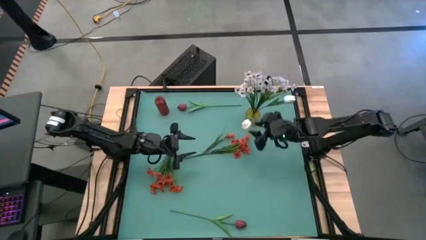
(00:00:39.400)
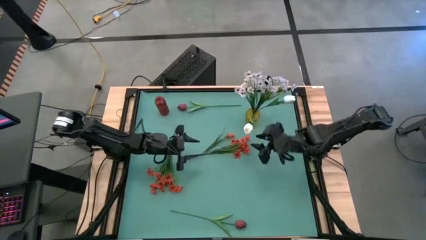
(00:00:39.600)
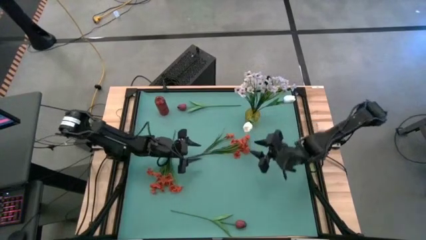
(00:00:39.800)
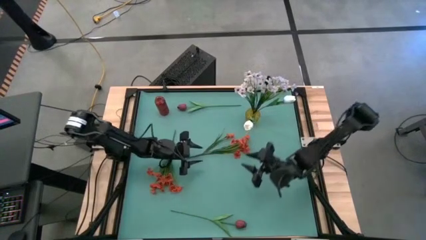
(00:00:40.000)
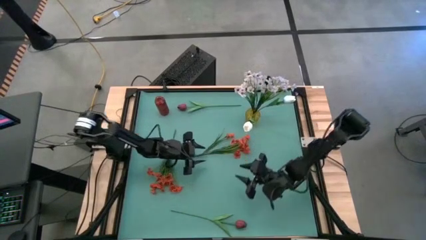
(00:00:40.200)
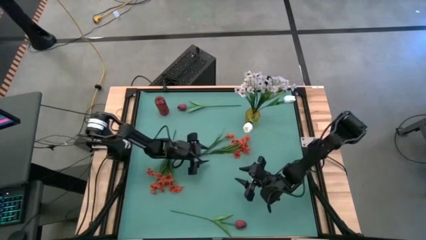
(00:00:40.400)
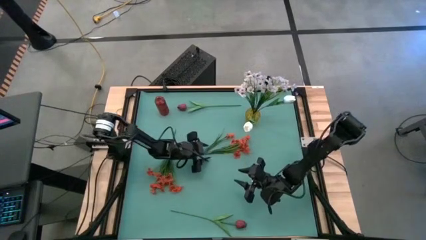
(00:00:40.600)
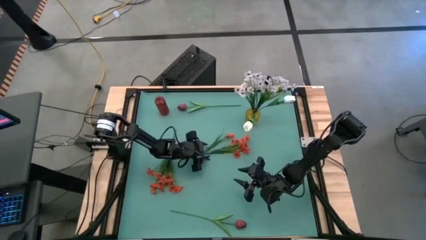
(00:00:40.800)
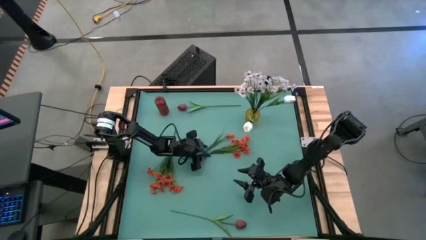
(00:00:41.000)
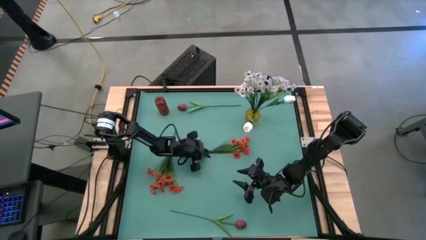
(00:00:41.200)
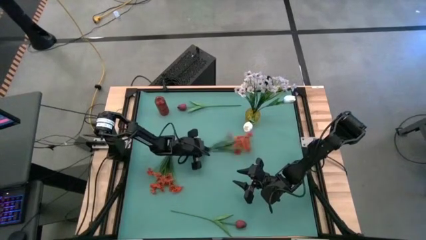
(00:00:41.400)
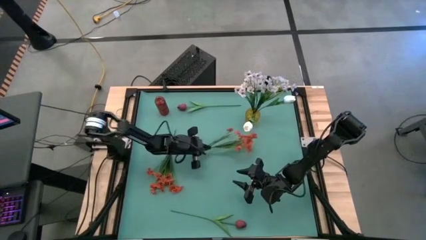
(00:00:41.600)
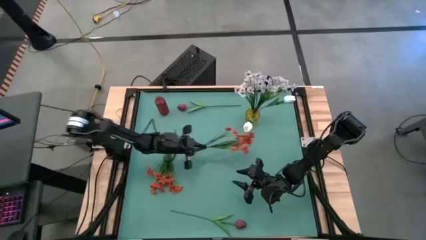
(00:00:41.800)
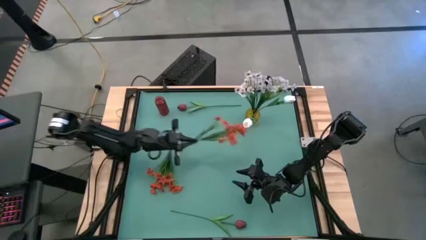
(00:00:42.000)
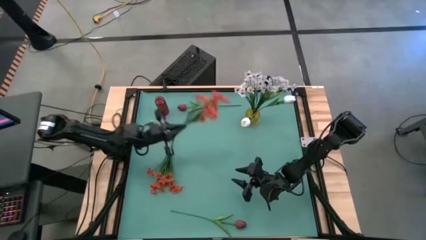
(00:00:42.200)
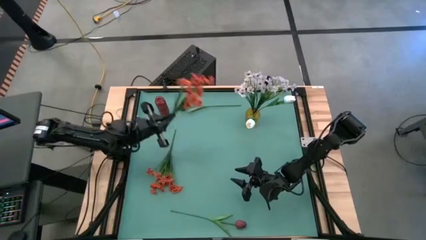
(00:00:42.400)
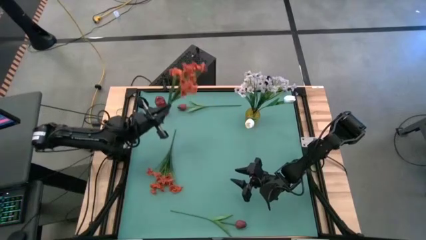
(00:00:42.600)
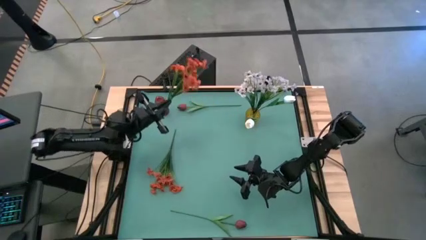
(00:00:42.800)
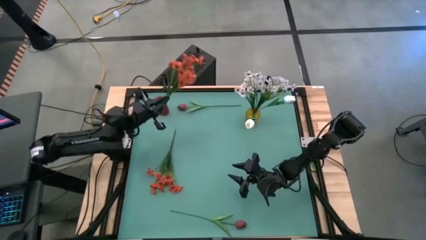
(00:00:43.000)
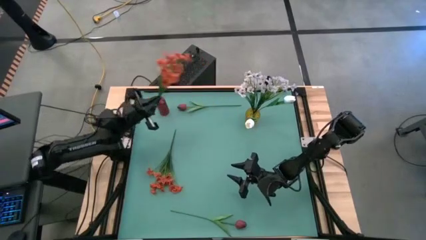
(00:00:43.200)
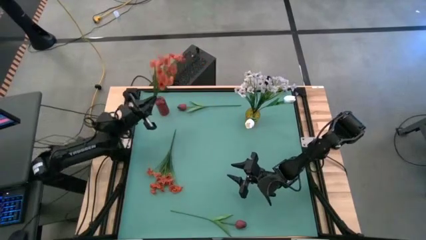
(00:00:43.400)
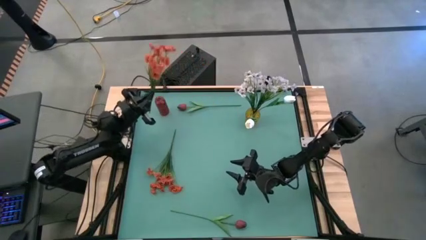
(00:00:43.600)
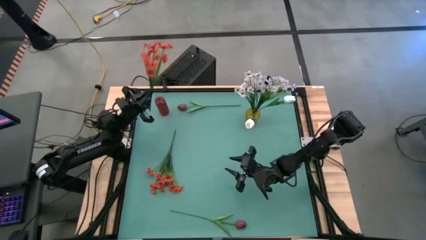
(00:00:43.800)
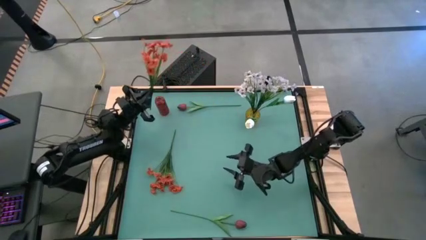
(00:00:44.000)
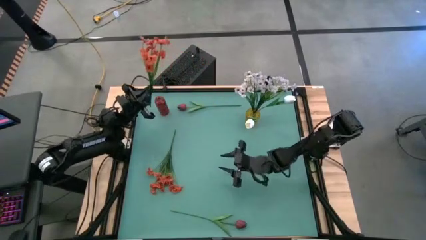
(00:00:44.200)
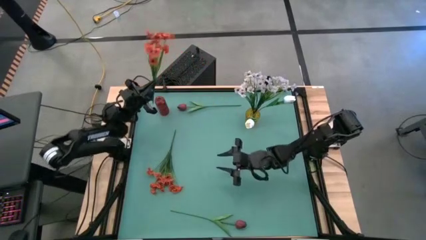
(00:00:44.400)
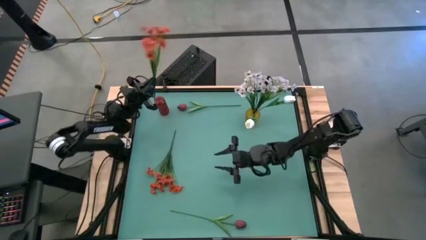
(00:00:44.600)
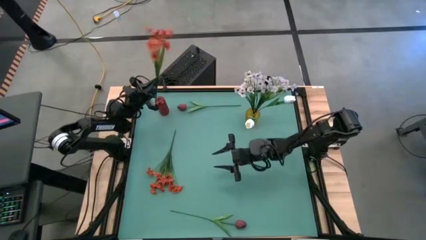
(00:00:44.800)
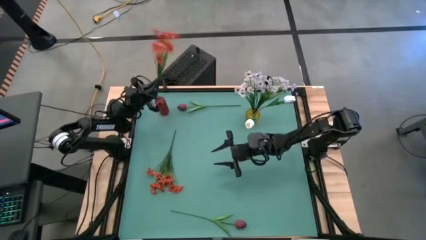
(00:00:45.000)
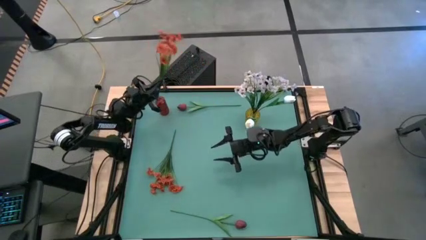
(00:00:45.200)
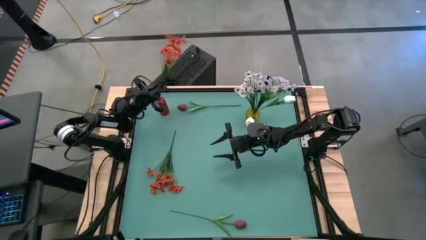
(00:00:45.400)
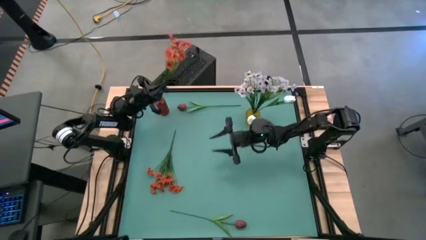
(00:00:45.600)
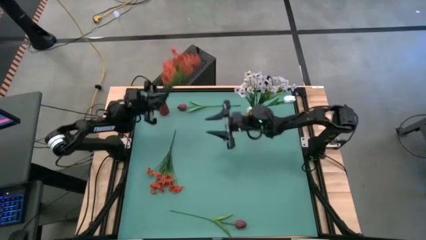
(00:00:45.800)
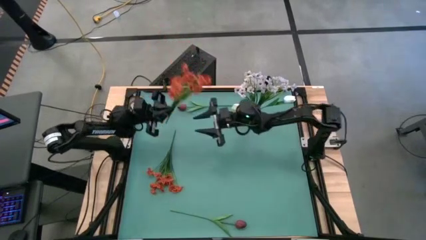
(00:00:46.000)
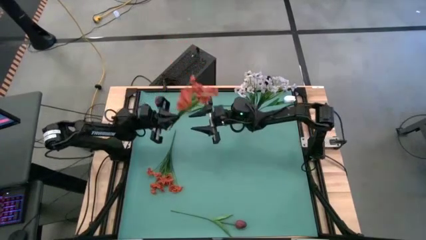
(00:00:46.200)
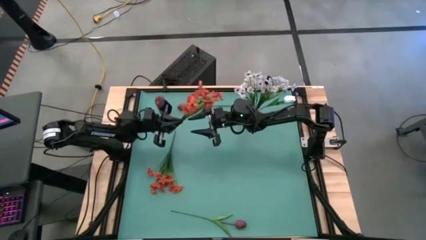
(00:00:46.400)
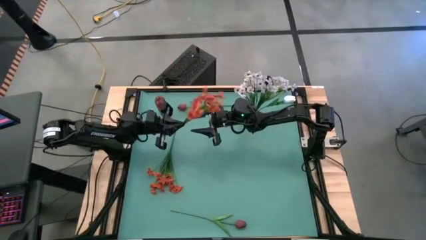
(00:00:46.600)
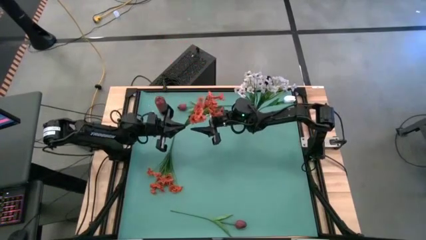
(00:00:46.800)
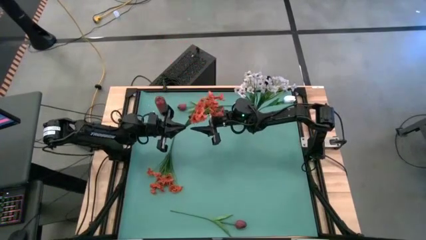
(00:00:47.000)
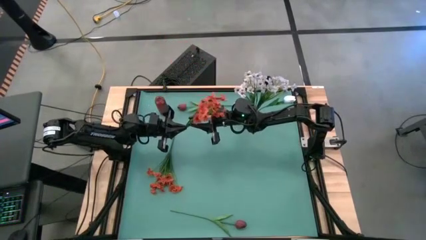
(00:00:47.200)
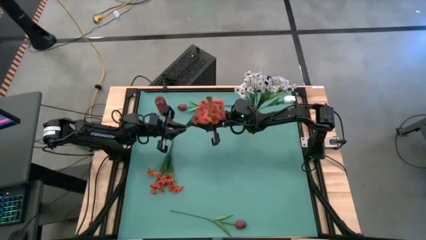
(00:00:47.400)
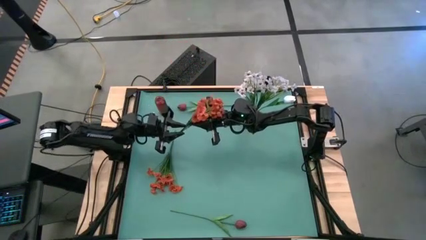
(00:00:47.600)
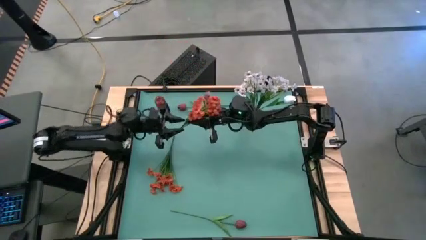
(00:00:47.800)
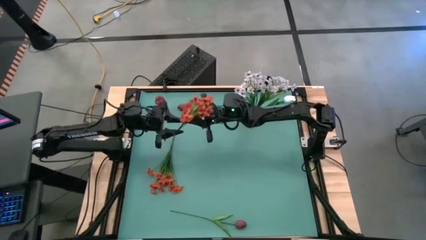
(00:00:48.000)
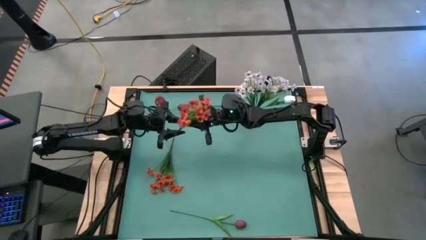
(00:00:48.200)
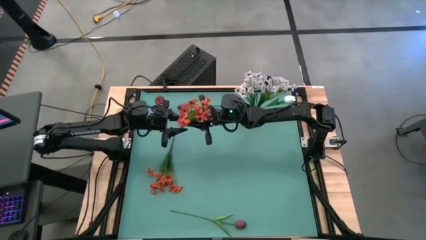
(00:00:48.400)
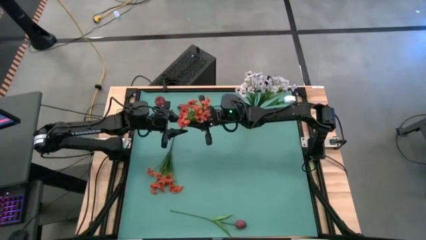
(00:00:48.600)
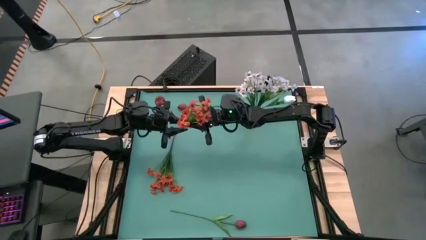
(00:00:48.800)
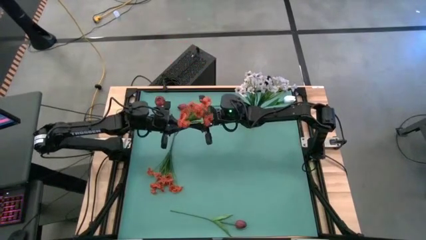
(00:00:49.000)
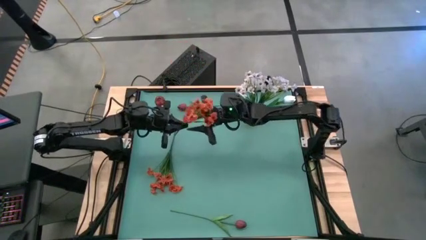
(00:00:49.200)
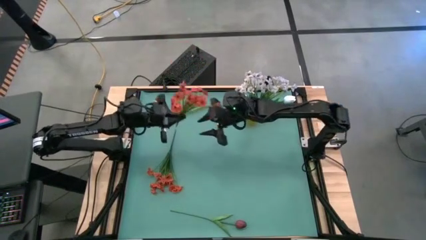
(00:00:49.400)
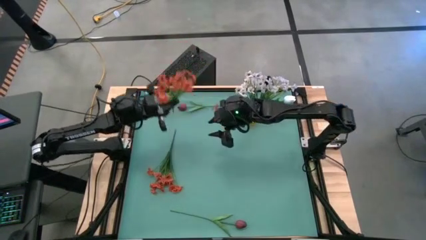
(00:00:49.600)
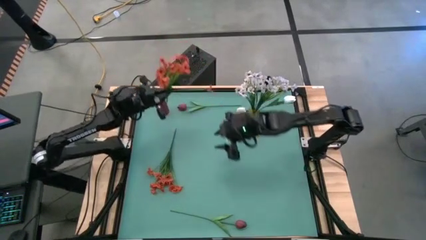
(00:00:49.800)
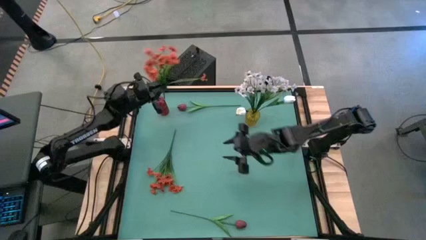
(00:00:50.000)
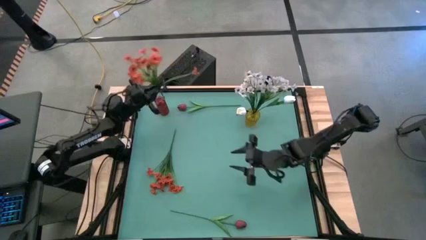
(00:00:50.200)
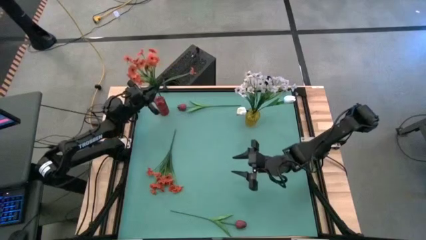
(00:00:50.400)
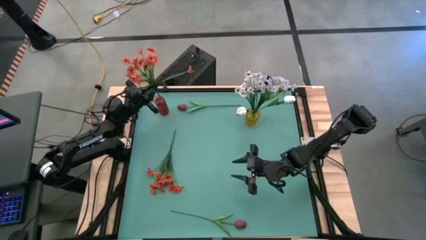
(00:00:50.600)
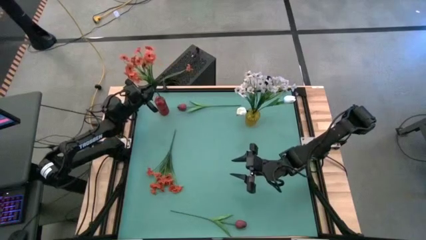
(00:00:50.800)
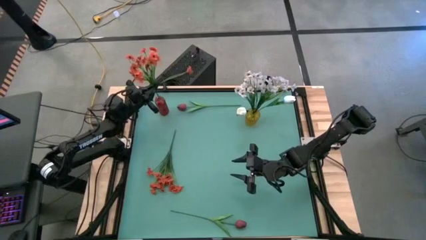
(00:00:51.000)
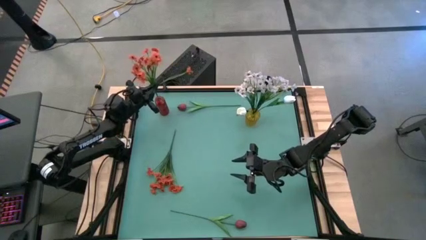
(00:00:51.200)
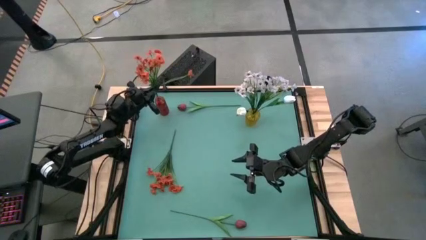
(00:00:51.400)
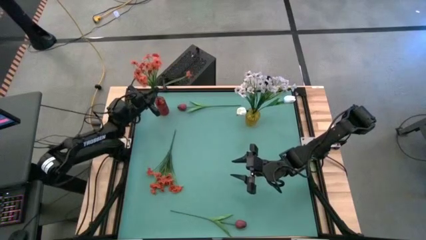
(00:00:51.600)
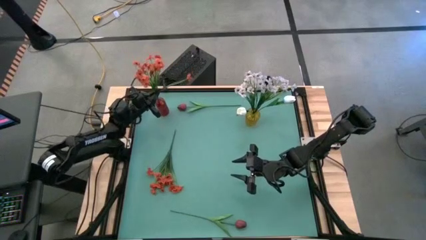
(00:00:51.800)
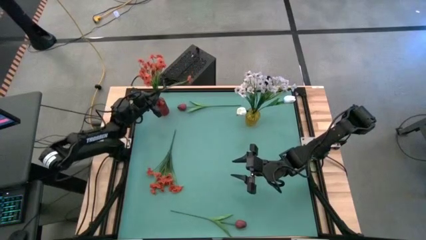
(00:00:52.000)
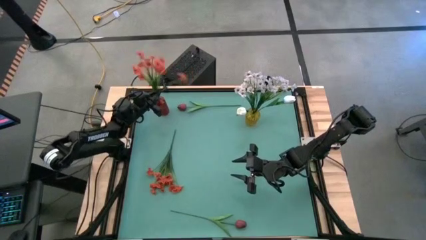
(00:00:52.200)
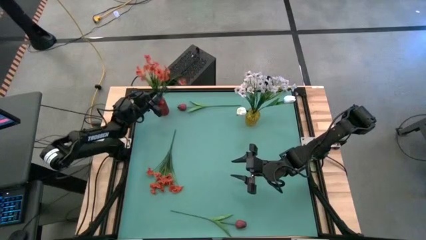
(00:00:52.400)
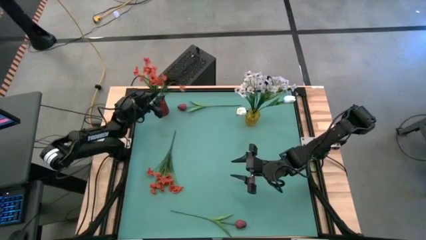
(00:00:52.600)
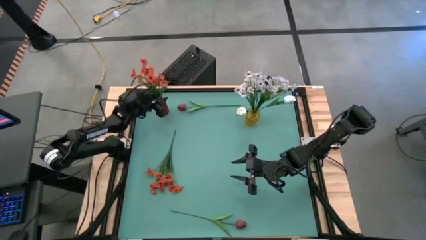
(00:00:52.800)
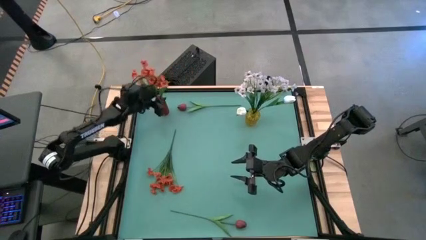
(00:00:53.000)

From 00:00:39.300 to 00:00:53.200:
Task: Sort flowers into vase by color
Put the right orange flowers into the red flower vase

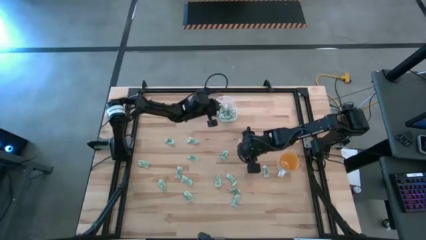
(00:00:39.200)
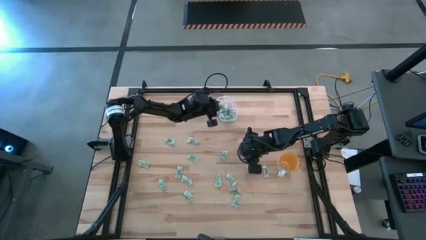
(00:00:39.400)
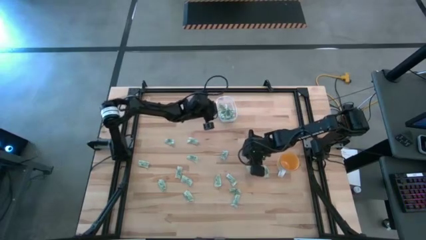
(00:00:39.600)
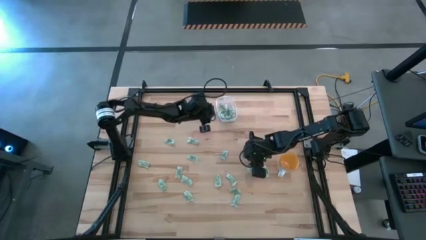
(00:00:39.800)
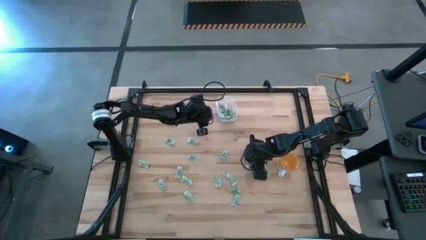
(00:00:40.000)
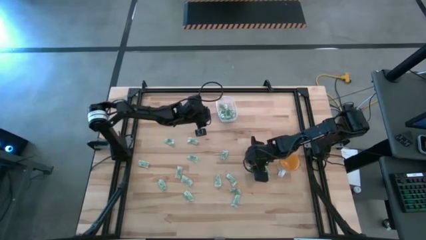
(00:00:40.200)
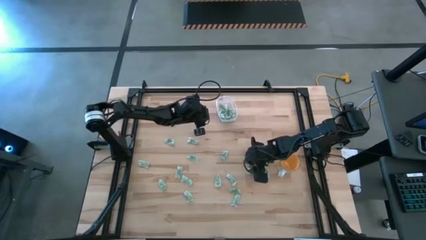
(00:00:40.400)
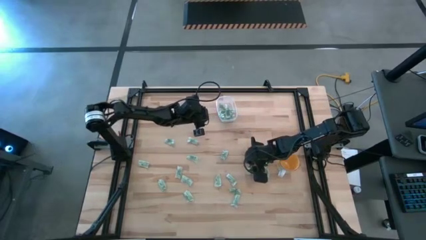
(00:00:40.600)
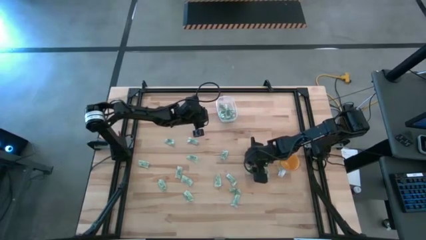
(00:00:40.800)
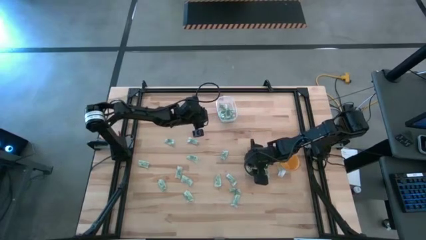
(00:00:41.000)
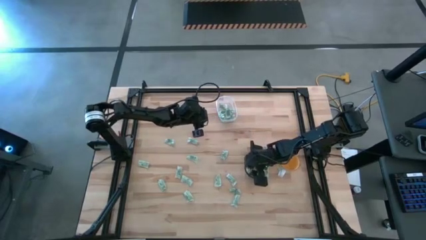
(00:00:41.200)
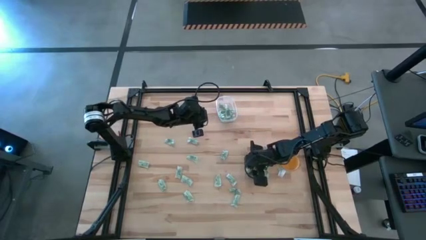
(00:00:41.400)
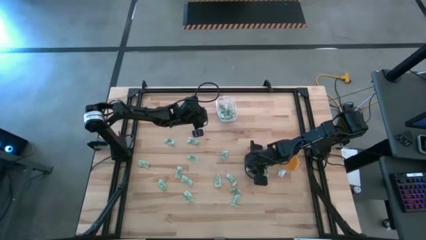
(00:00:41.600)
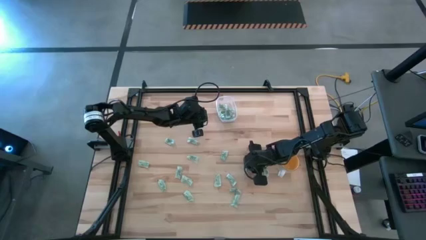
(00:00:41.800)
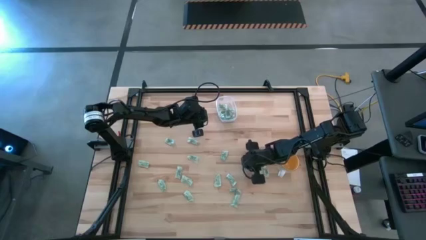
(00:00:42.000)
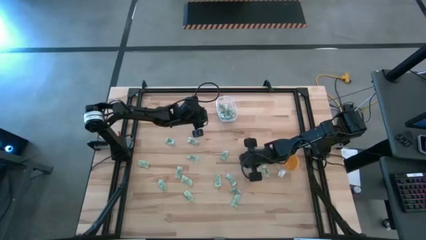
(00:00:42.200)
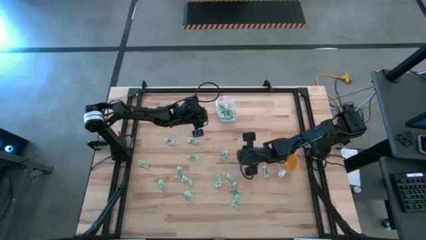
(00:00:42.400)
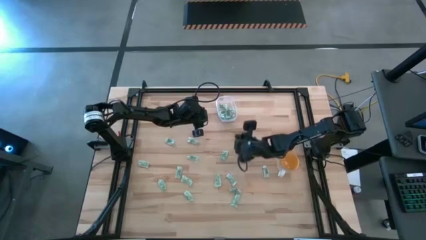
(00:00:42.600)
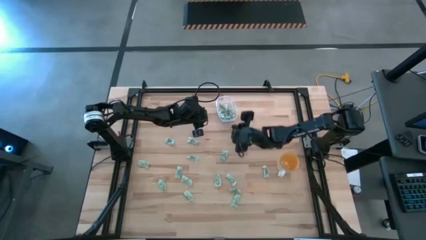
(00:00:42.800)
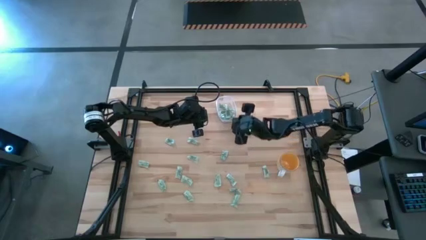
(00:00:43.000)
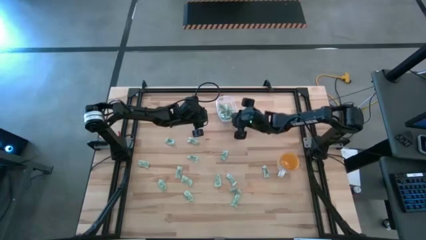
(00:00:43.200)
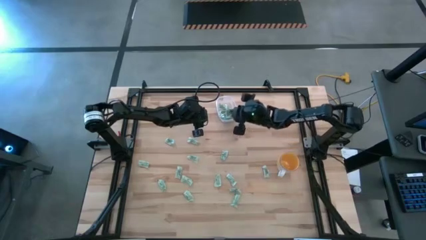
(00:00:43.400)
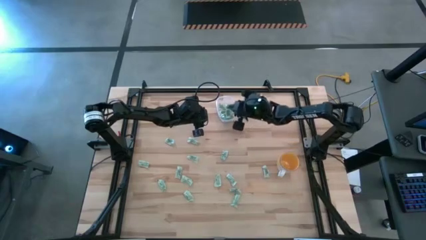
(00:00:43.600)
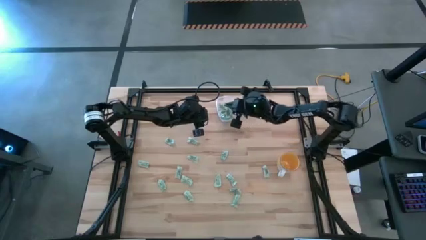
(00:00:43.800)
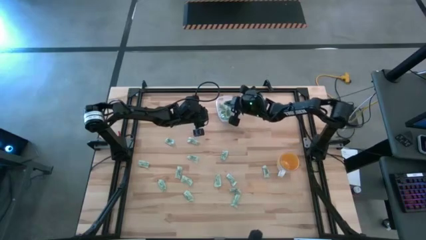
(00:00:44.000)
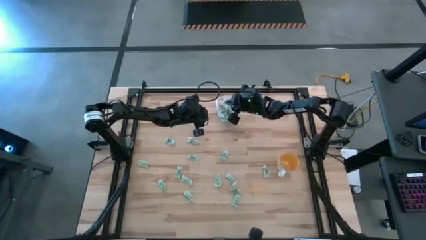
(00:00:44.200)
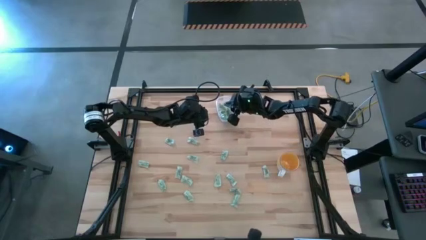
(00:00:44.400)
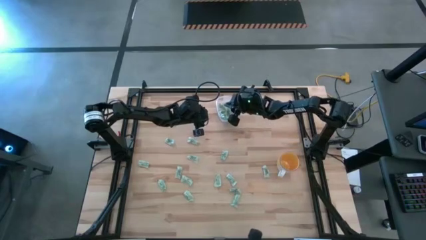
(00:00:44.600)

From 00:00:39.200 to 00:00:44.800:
Task: Pick and place Stevia / Truvia into bins
Put the green stevia packet into the transparent bin
